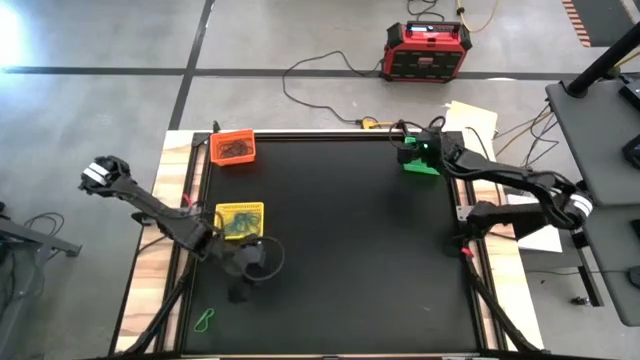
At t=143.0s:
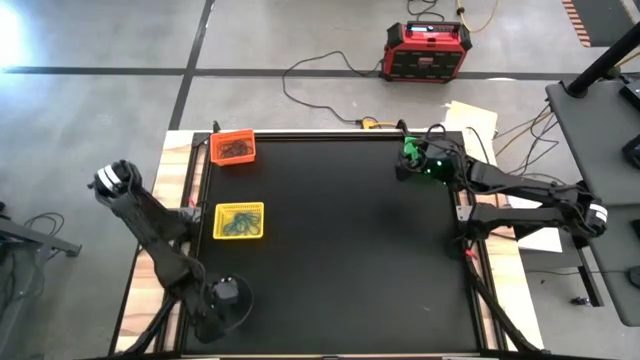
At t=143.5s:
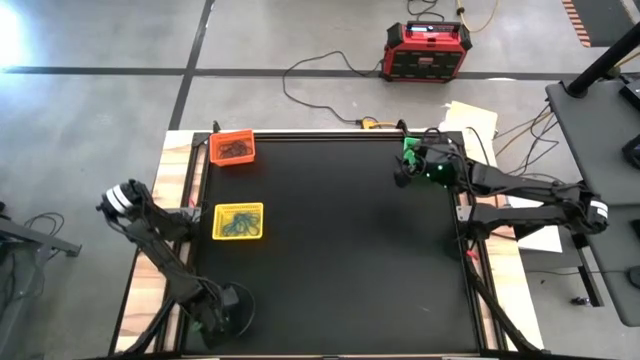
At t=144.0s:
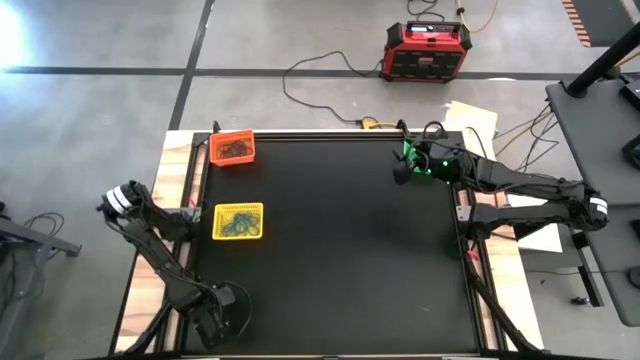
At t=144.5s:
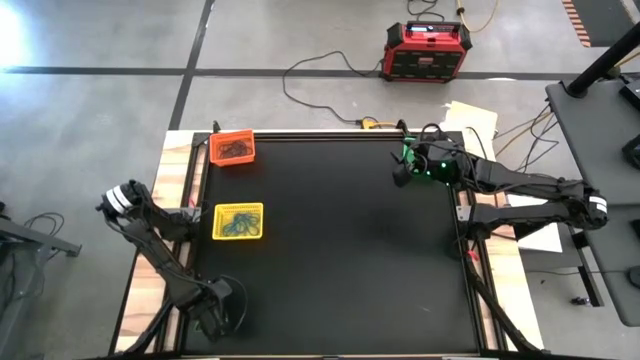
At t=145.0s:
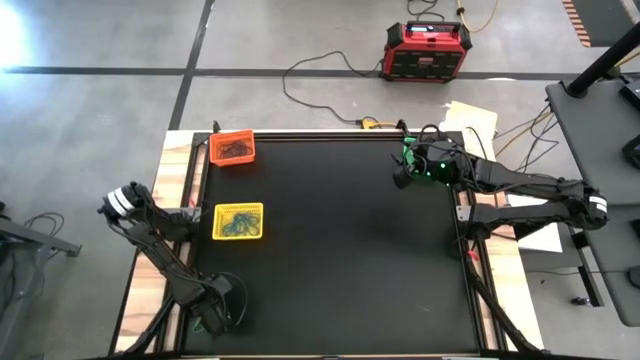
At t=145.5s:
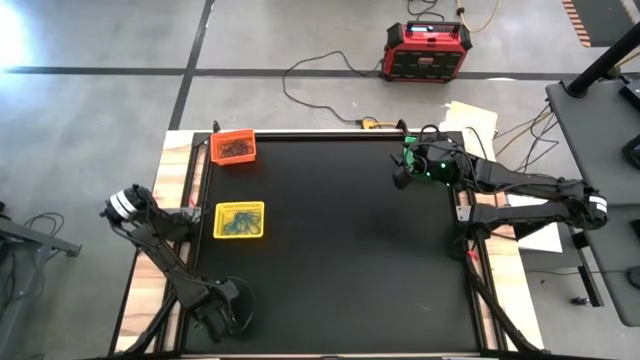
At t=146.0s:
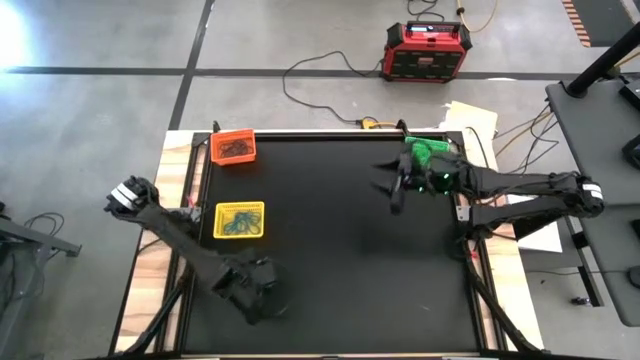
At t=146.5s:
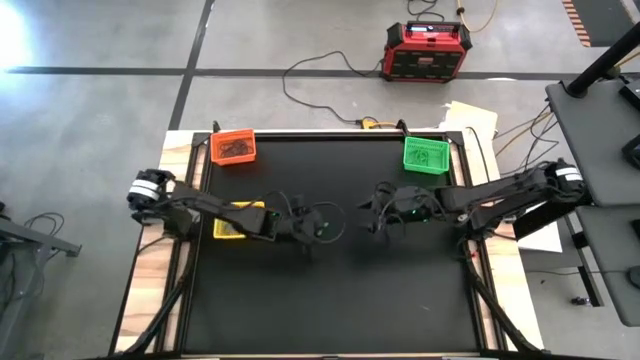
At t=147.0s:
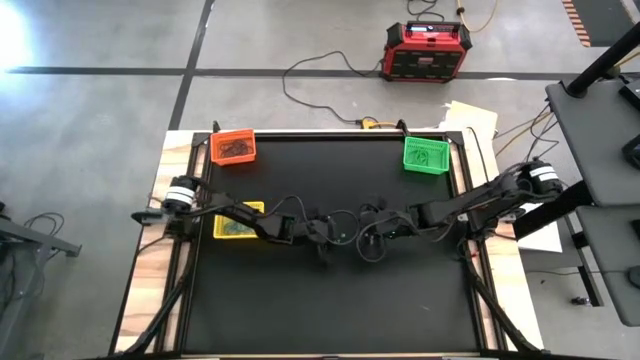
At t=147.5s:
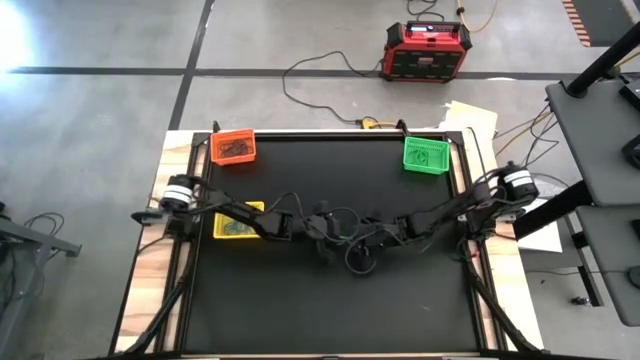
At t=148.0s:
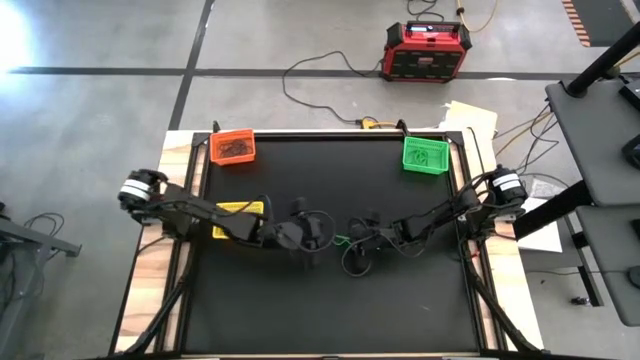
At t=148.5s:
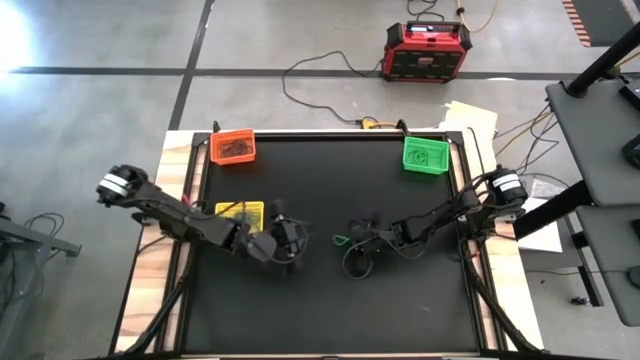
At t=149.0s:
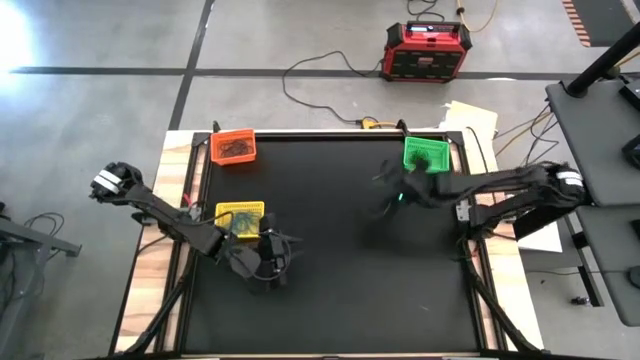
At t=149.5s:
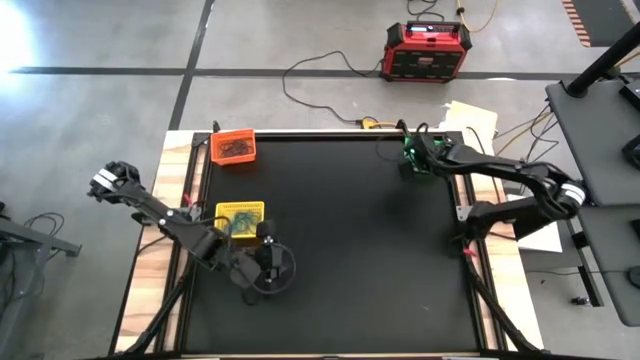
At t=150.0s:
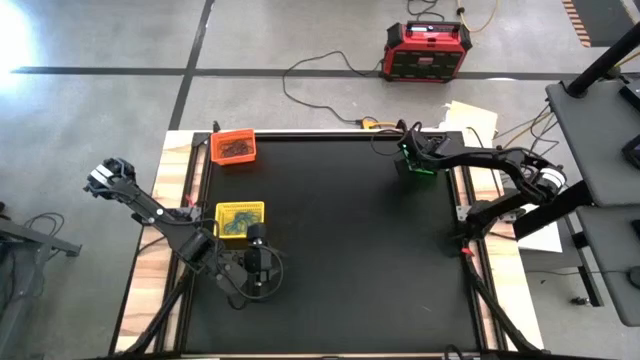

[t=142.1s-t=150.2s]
Task: Sort rubber bands into baskets
Put the green rubber band into the green bin

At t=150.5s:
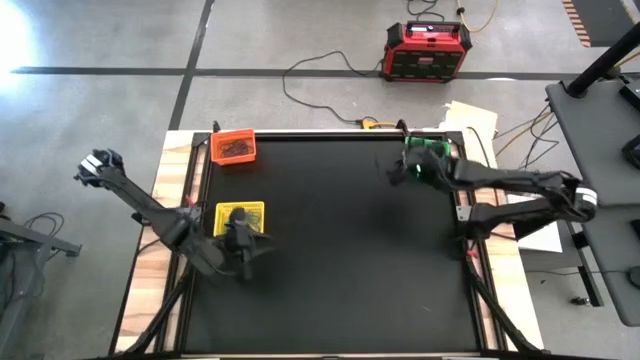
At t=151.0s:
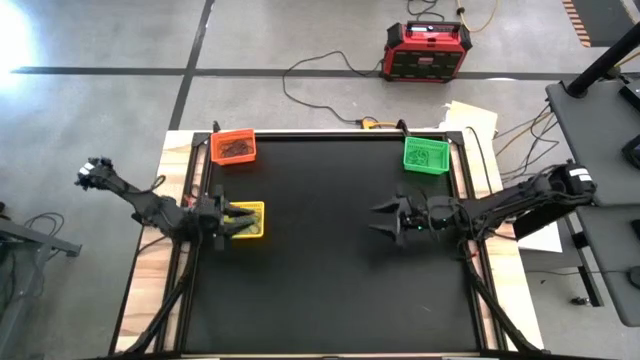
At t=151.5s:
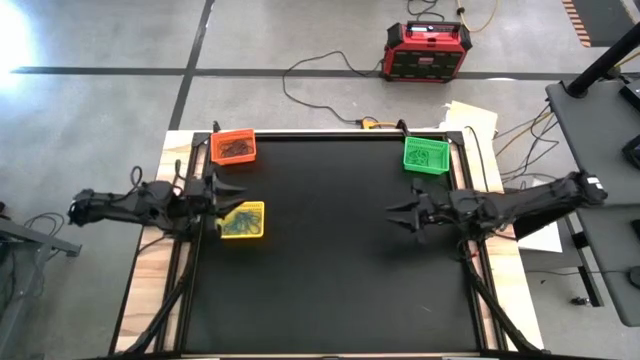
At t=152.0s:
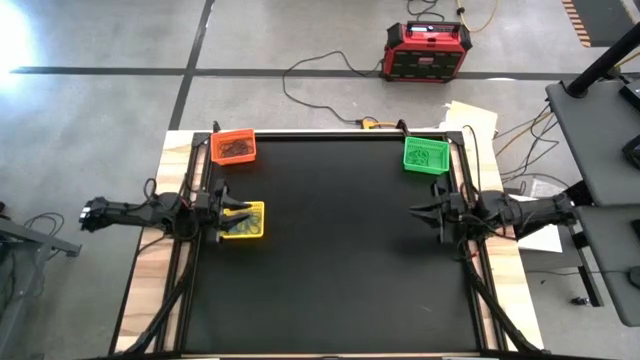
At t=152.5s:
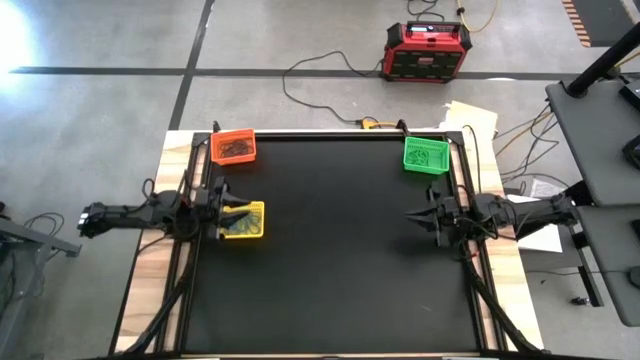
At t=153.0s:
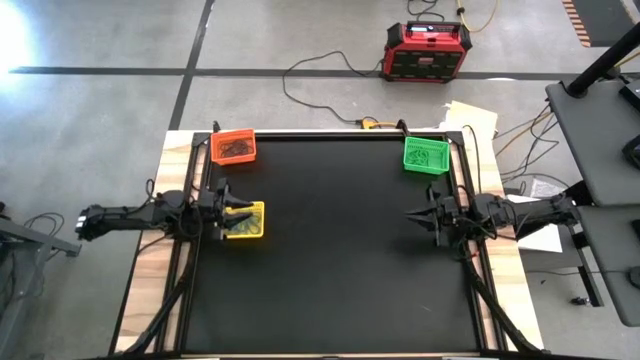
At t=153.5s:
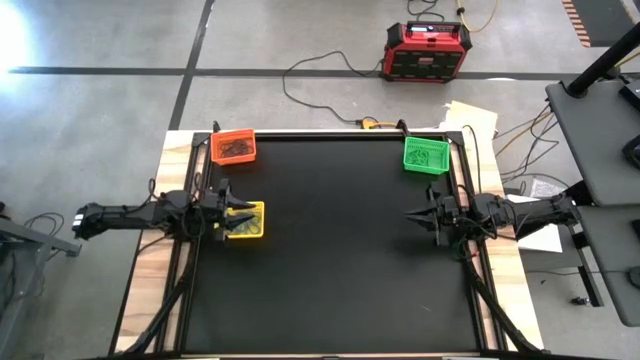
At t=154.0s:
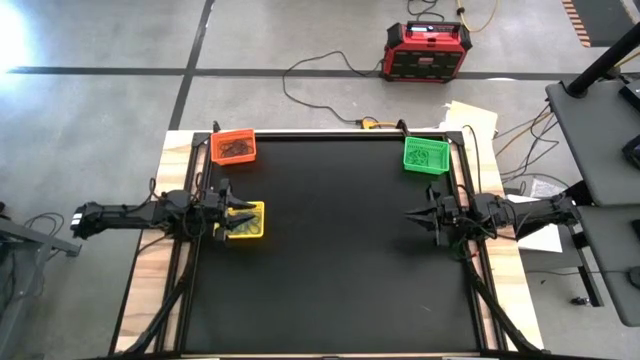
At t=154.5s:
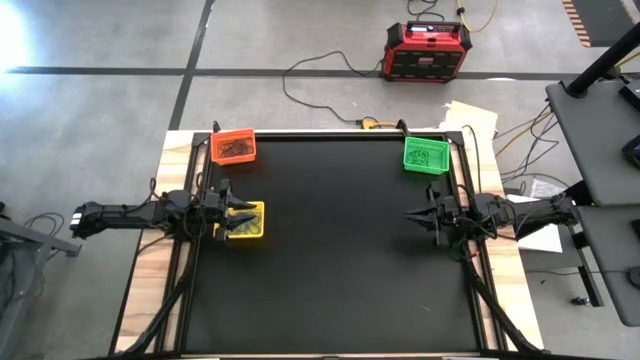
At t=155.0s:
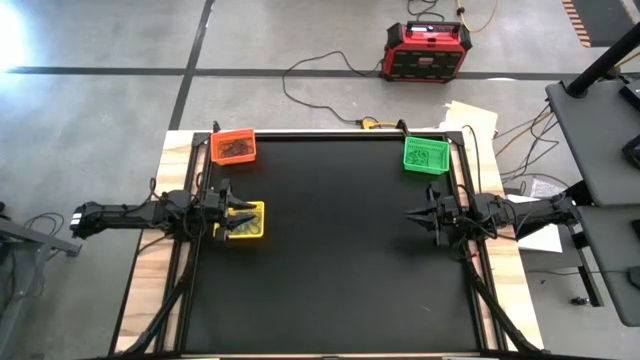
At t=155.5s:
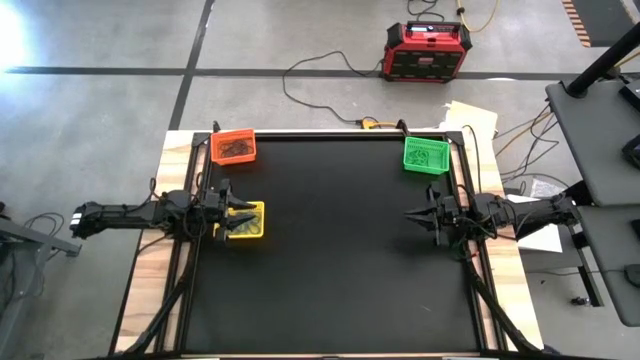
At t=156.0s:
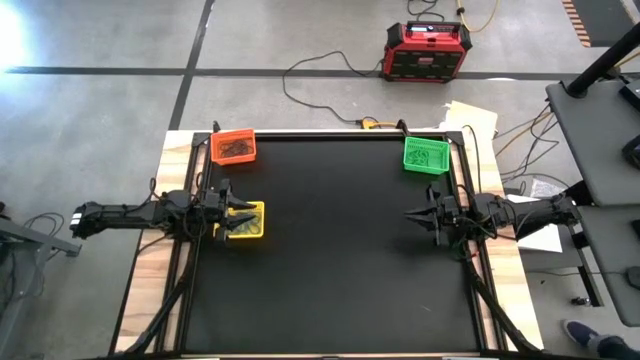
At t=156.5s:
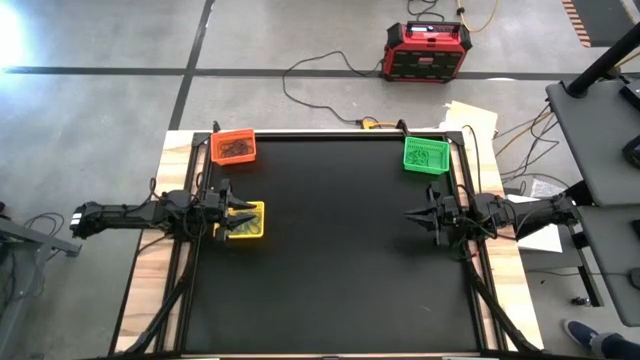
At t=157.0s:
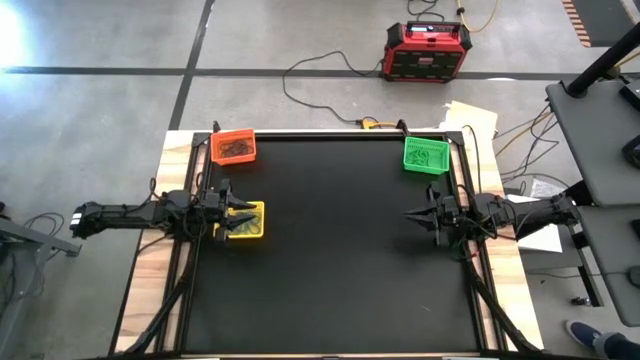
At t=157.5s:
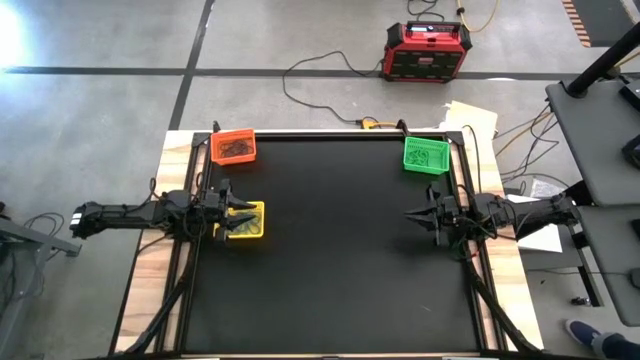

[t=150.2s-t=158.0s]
Return to Home Position
